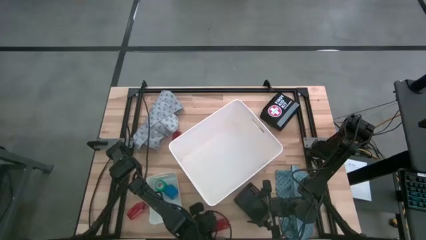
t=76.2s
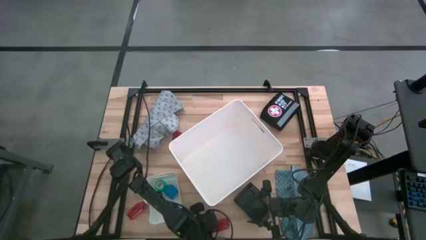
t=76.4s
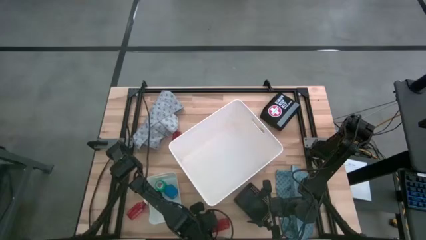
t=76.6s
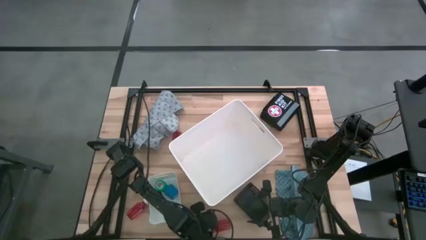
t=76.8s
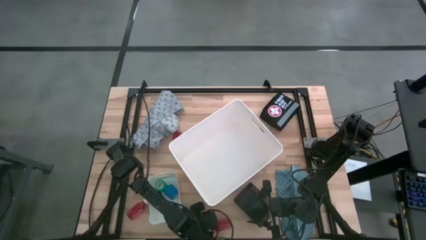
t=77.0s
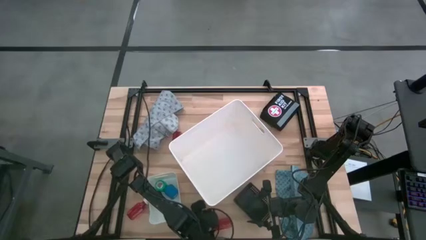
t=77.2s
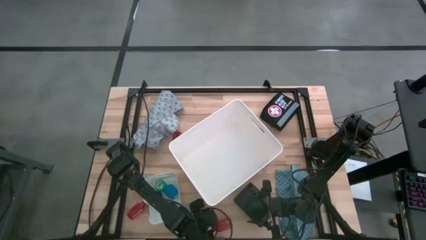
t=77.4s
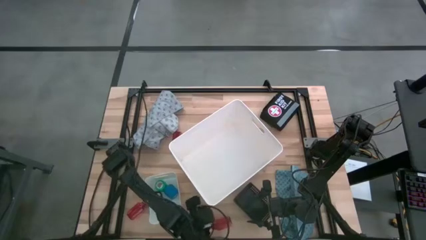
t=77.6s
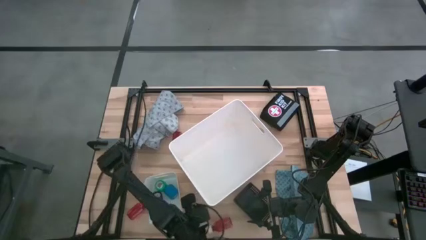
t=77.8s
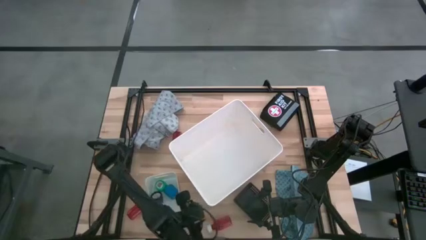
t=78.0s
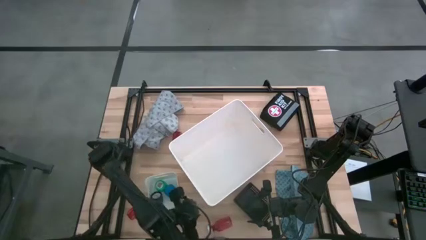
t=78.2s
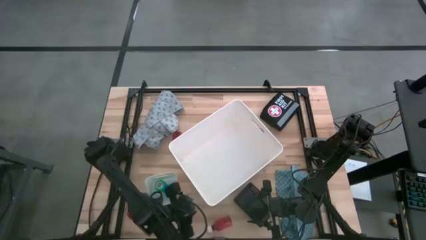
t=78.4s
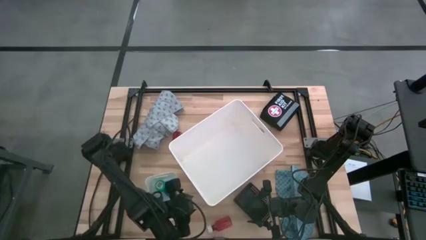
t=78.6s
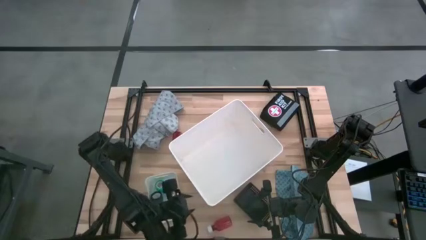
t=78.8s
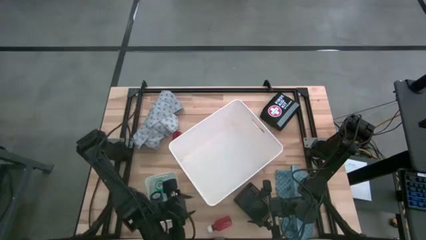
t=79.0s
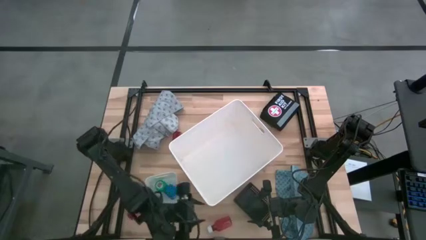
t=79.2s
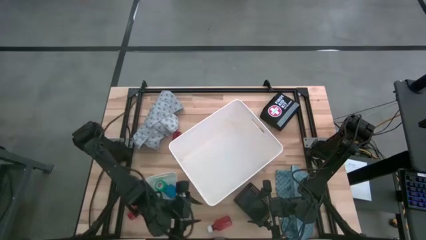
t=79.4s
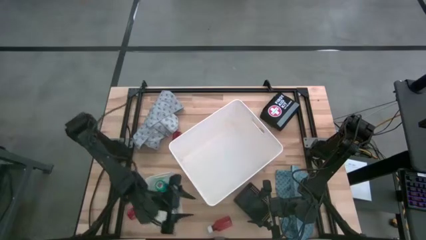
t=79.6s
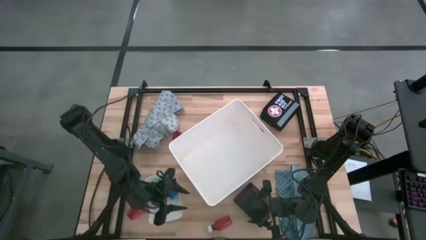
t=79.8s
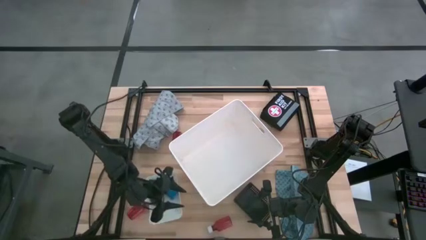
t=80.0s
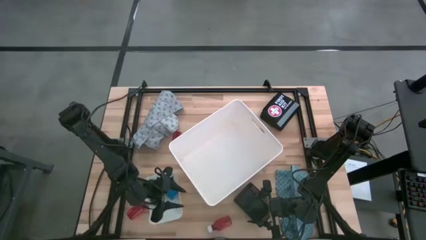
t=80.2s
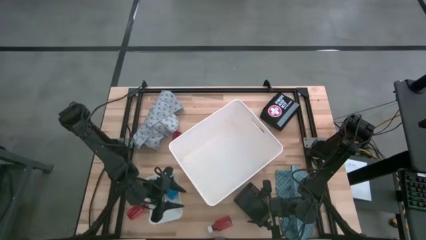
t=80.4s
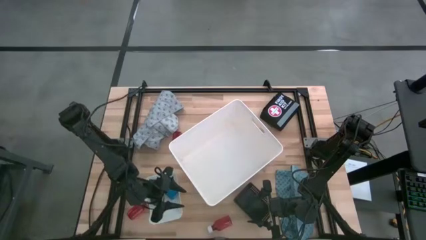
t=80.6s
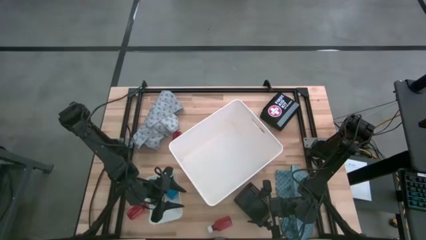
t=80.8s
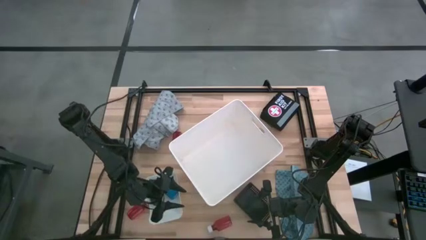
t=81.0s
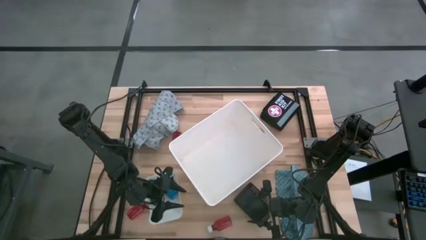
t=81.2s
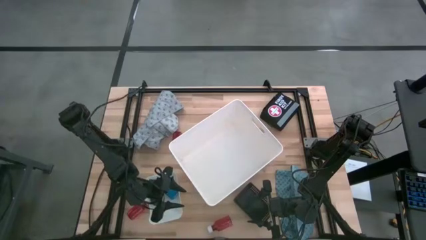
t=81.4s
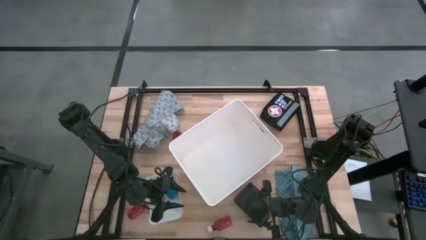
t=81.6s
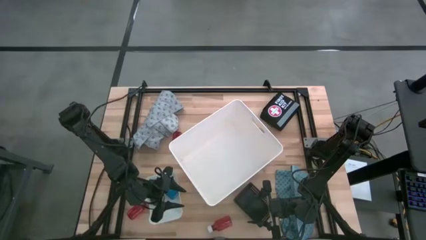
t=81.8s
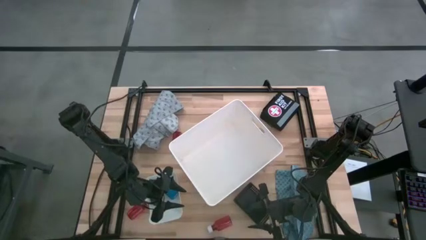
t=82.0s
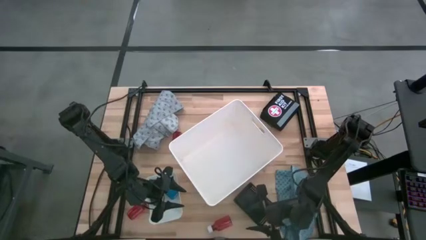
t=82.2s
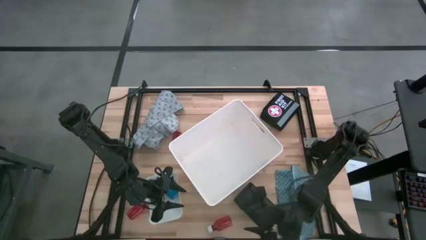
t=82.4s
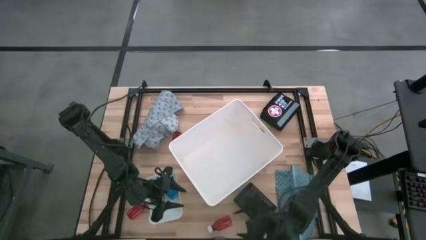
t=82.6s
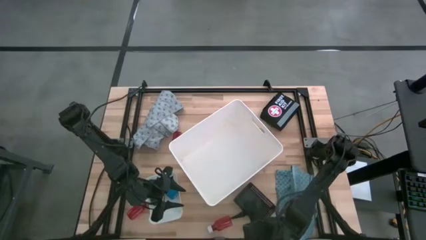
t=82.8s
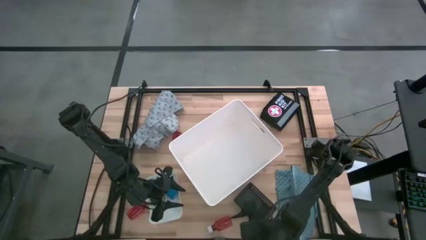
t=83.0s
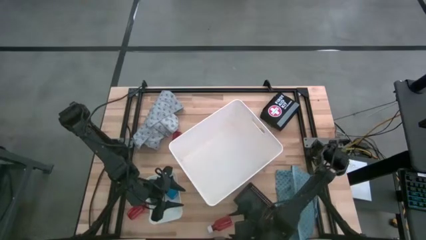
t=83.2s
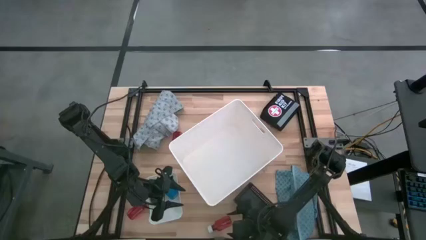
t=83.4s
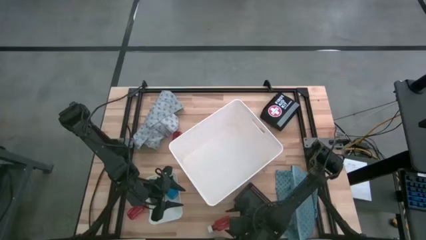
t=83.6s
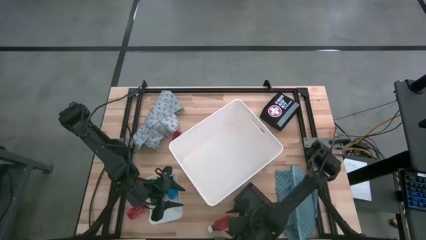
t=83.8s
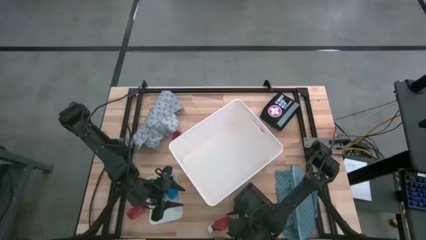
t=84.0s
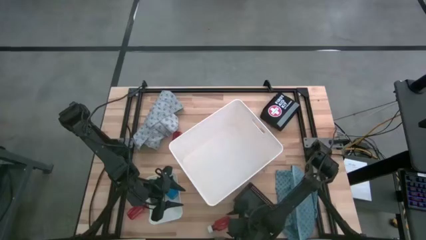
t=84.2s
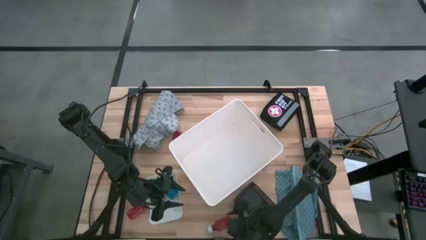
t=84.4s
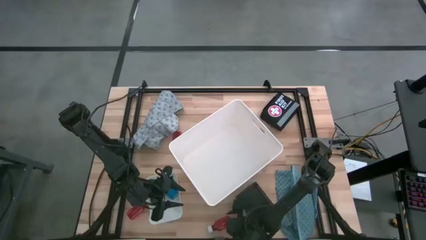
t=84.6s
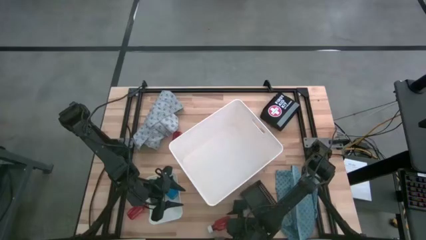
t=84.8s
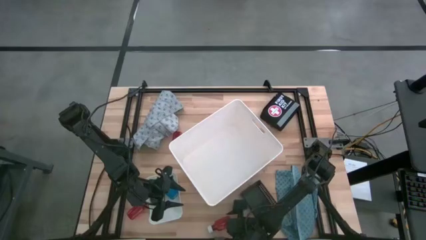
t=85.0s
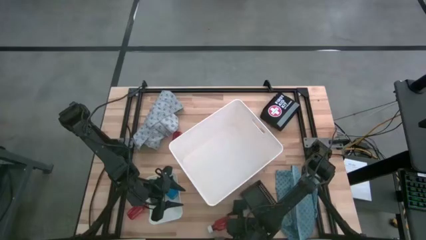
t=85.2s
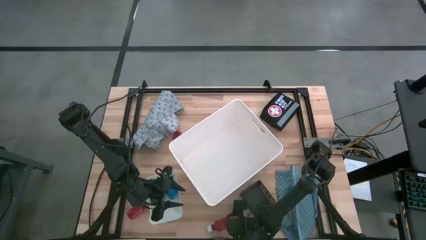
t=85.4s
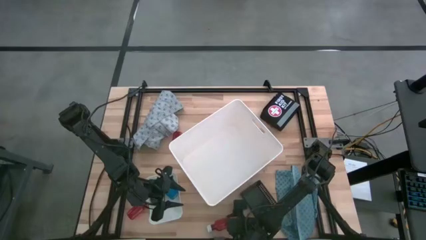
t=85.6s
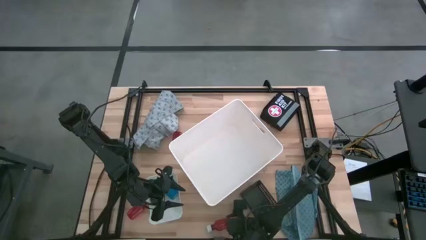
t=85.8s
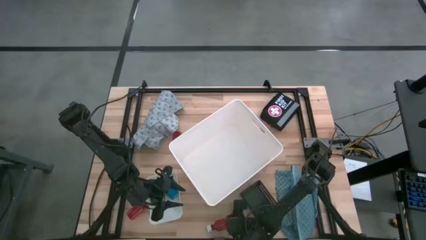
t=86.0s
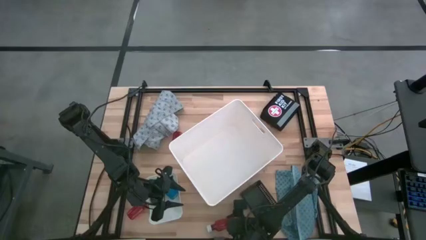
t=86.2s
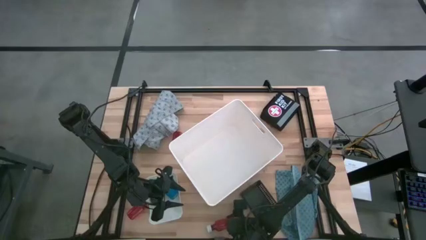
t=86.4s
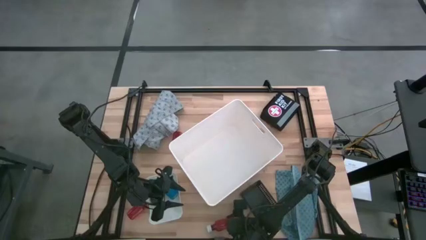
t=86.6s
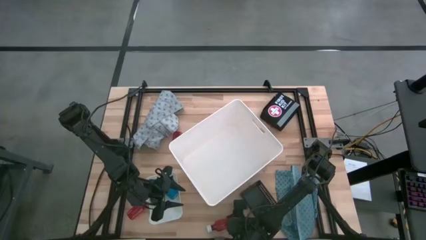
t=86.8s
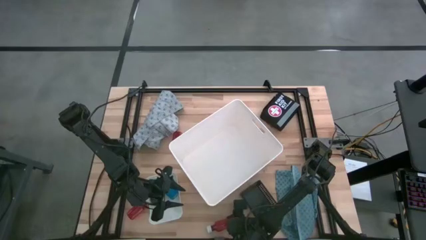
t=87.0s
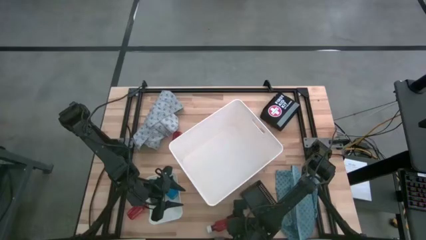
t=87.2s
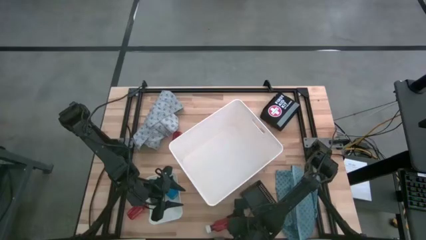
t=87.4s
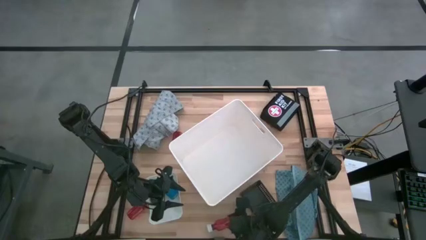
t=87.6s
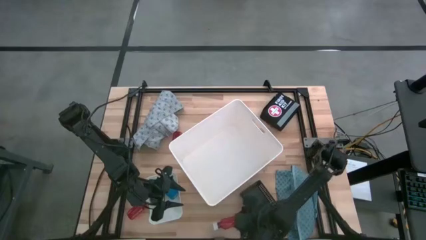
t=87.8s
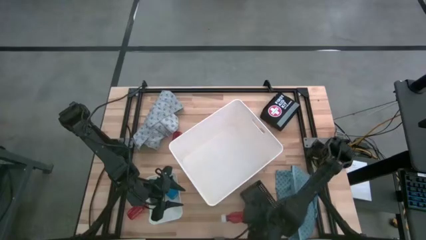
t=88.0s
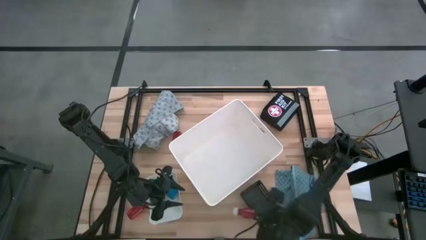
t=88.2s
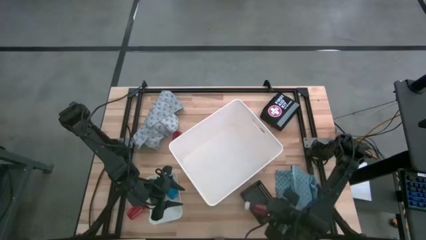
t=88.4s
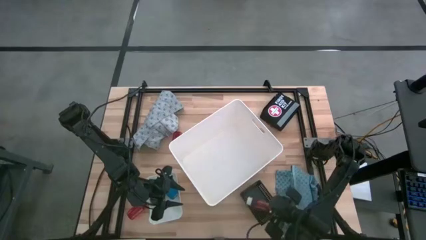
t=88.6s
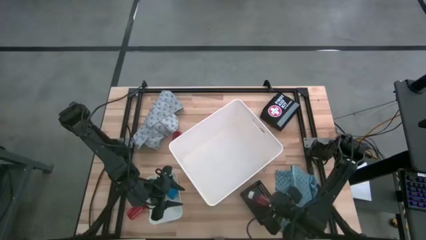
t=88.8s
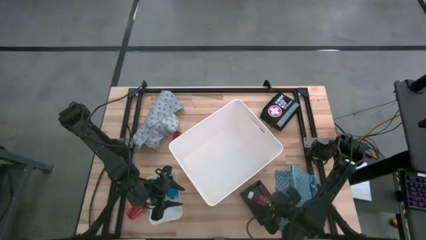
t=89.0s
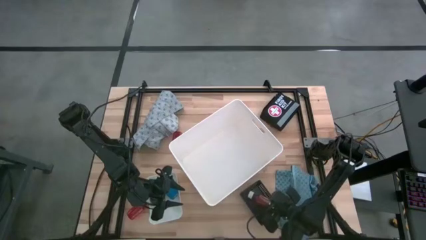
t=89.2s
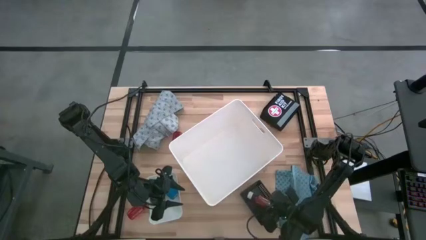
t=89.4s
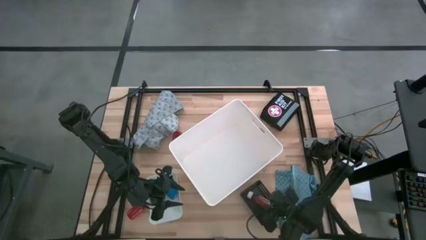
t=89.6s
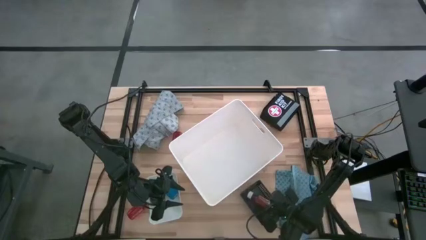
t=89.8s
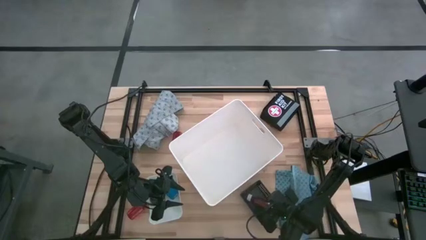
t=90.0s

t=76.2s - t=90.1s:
Task: Pick & place medical supplies in basket/bin
Put the middle orange bottle into the black basket

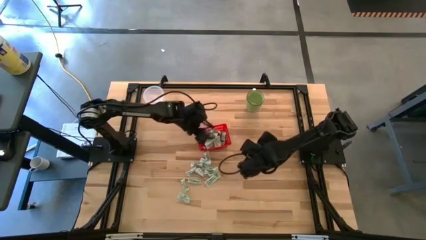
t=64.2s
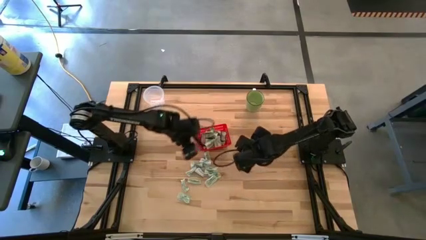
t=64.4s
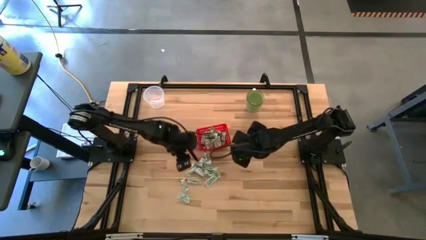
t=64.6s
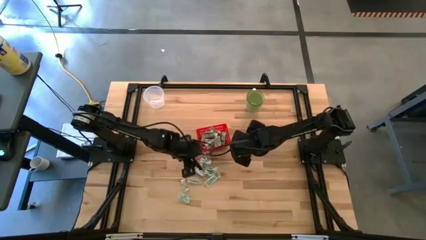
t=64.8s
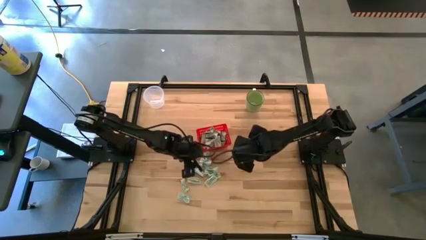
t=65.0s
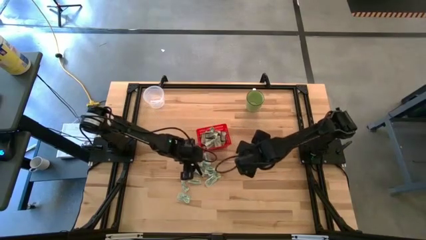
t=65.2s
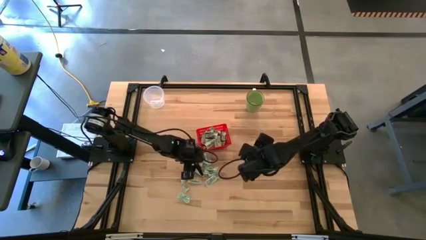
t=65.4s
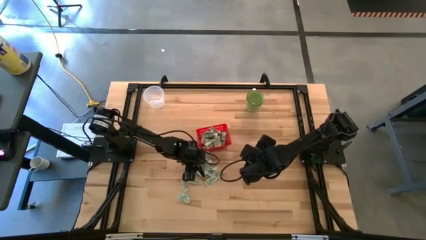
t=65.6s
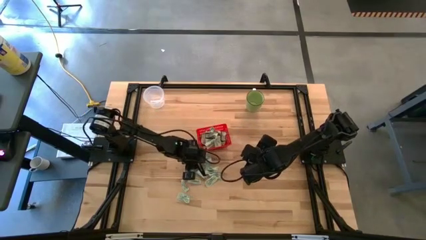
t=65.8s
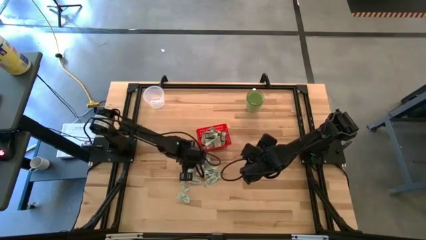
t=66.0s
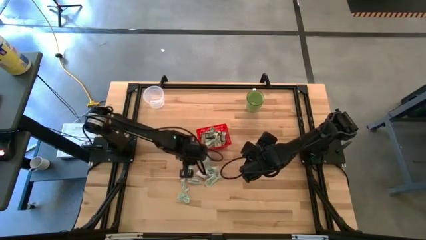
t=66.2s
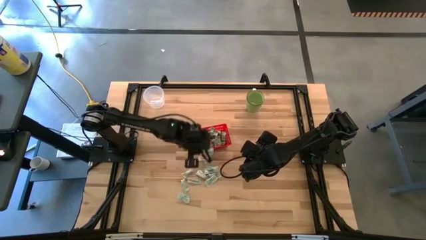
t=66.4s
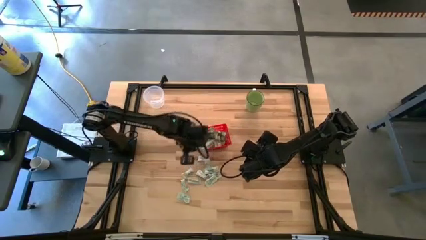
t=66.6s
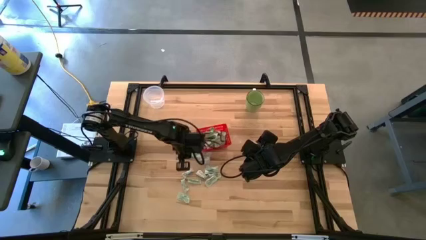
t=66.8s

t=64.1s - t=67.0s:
Task: Pick and place Stevia / Truvia into bins
Put the stevia packet into the red basket

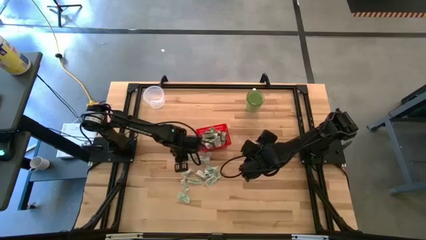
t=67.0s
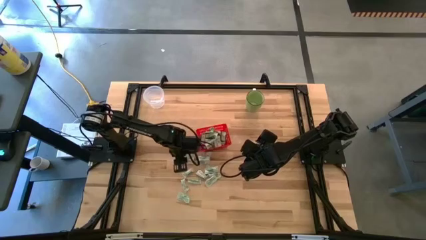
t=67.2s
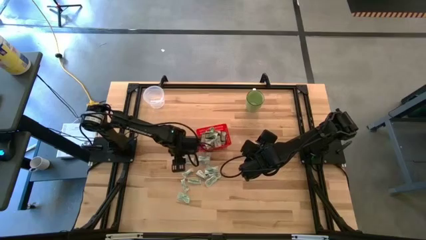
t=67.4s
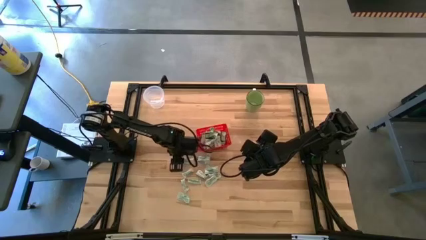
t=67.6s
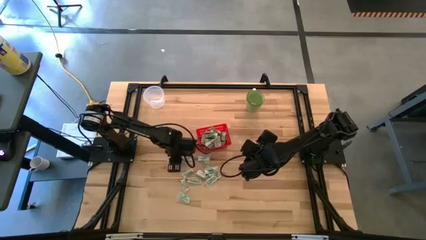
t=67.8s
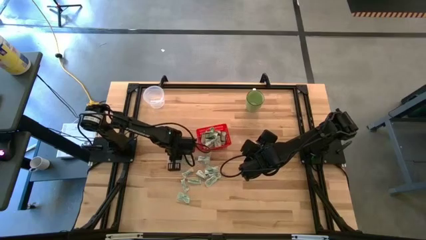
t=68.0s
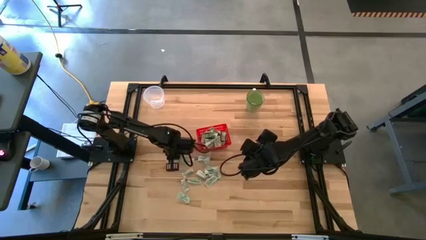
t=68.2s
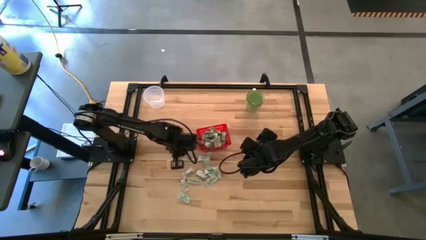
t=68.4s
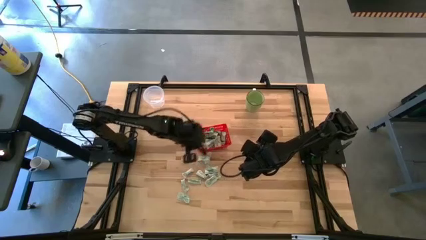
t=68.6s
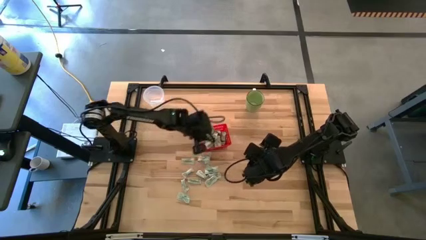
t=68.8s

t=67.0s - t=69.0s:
Put the stevia packet into the red basket
